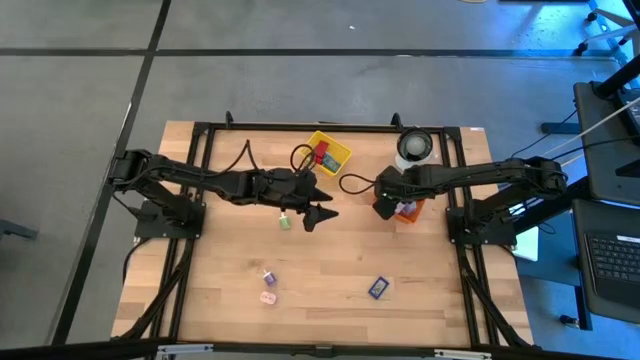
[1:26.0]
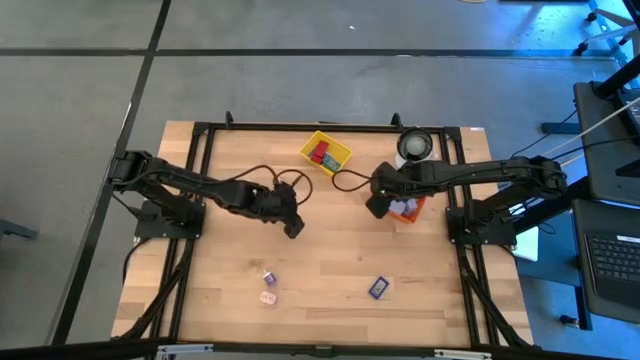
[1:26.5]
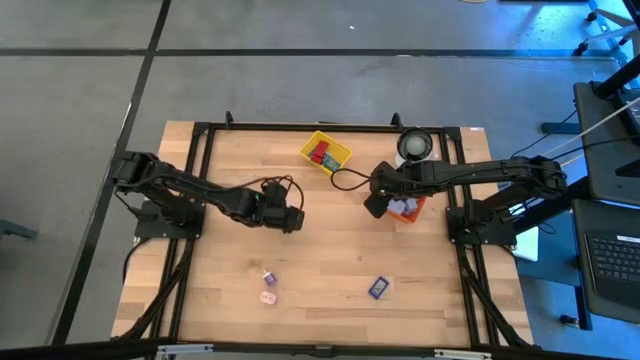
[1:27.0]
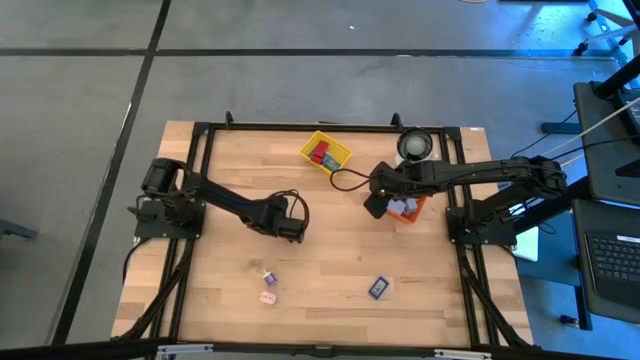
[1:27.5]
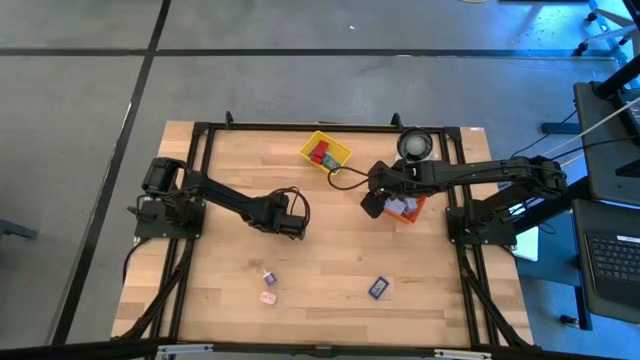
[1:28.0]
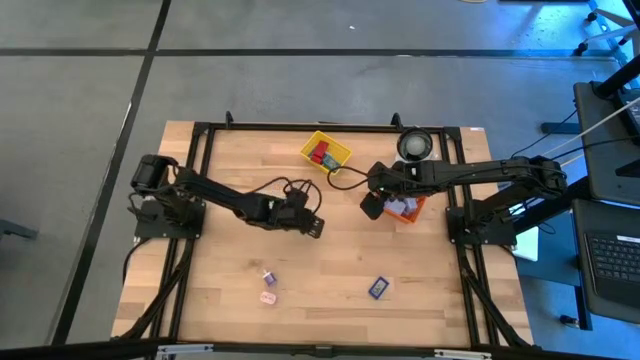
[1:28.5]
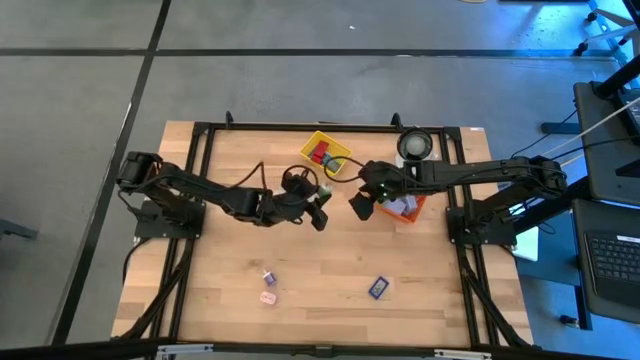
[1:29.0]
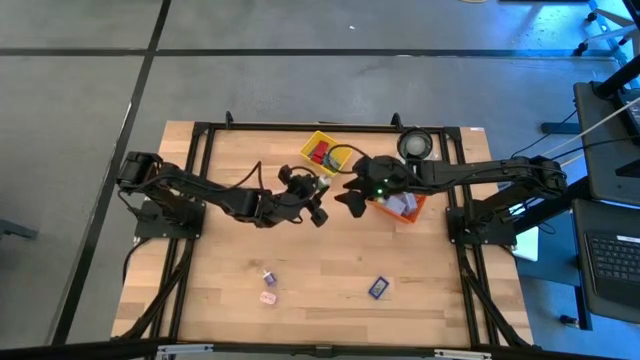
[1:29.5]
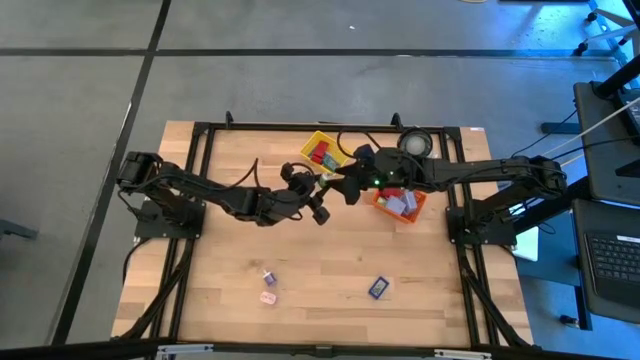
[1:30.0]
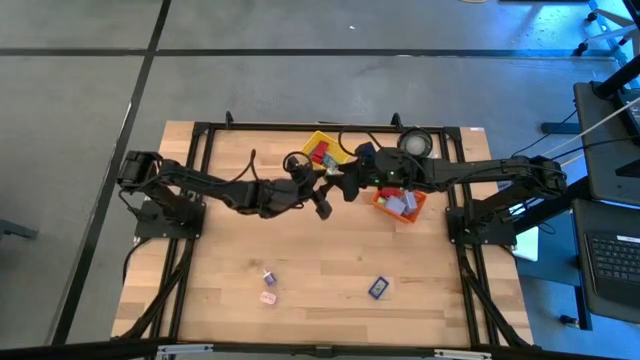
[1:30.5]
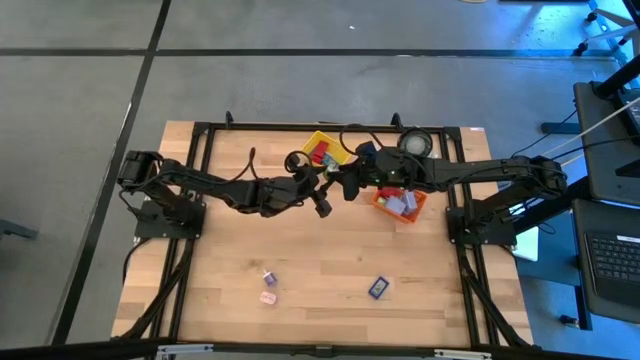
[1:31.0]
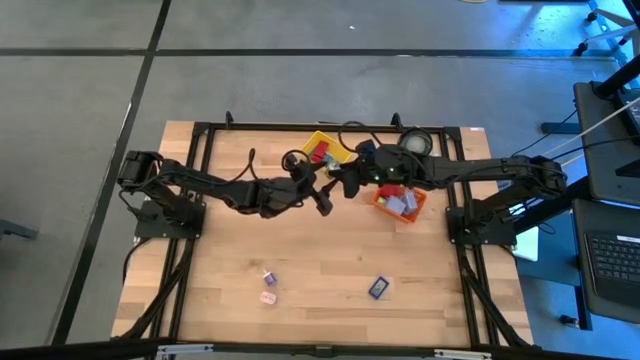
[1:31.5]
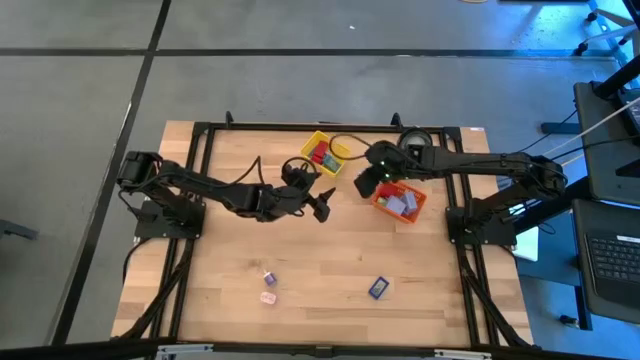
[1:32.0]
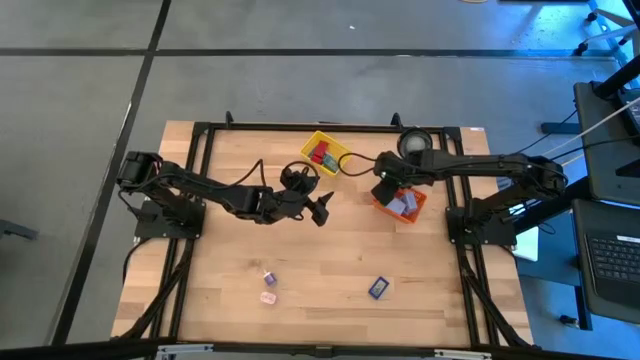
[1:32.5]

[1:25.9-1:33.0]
Task: Pick & Place Office items
Put the green charger adapter into the orange bin

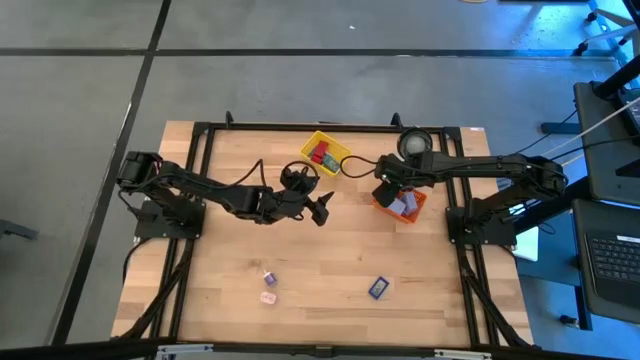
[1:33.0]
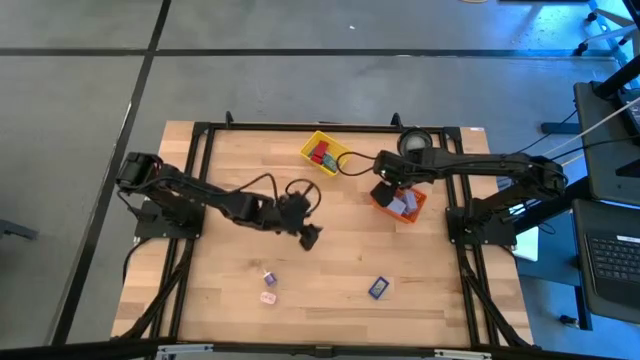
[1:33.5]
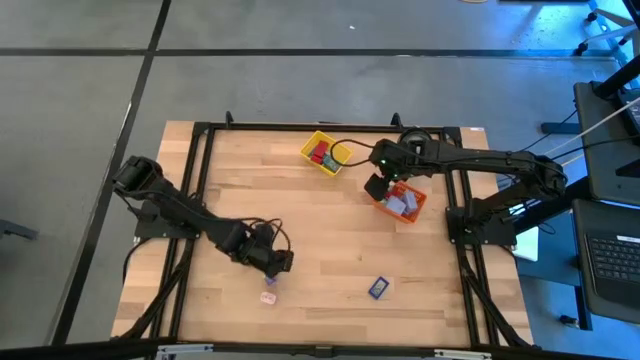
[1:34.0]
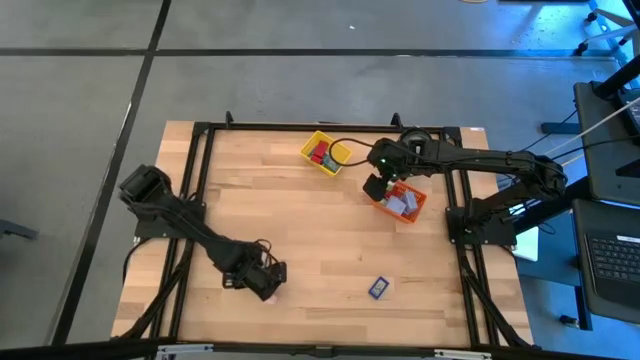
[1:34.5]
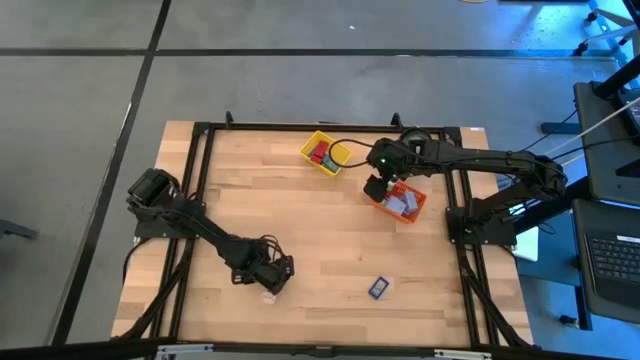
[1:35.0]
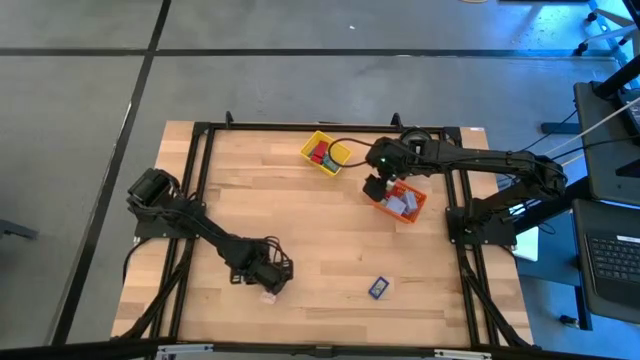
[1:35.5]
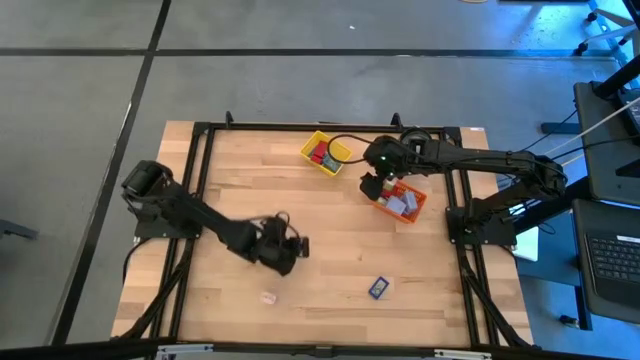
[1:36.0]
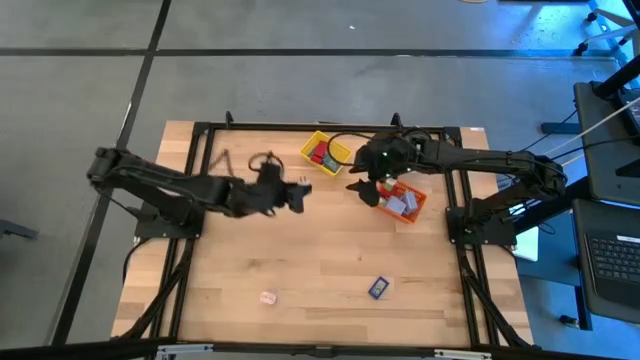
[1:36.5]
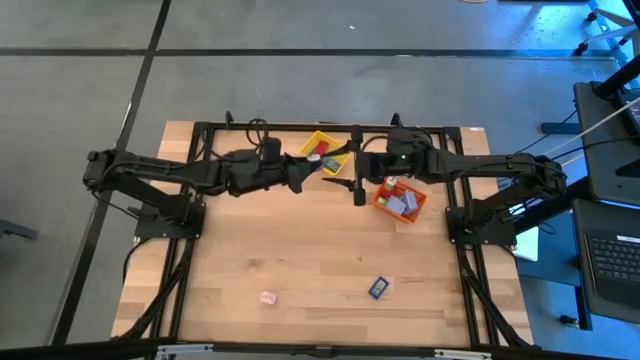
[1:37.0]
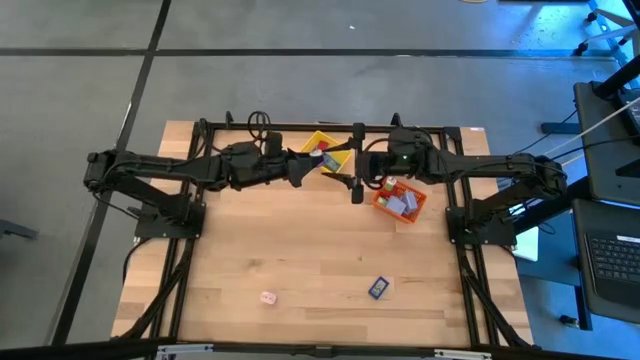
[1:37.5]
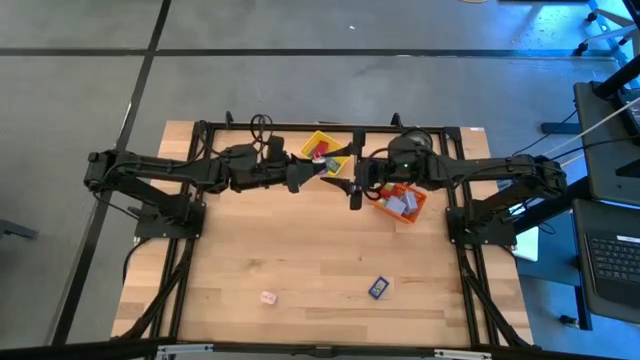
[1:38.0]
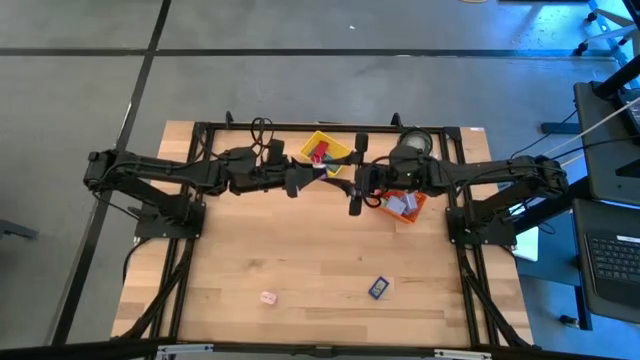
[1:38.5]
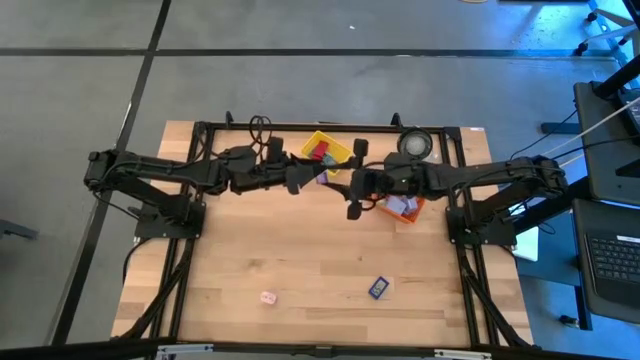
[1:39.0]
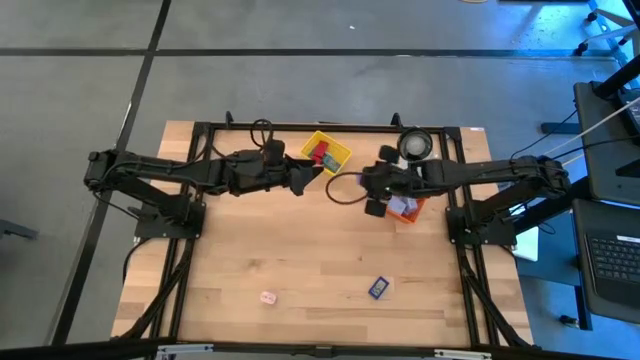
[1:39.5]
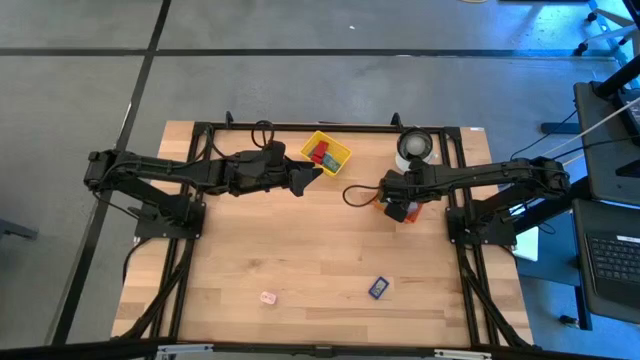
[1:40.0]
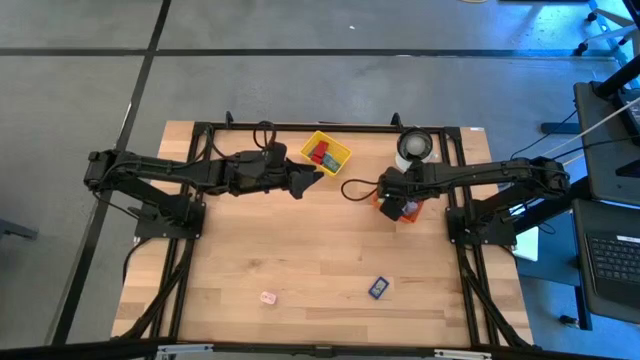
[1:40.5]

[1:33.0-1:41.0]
Put the blue charger adapter into the orange bin

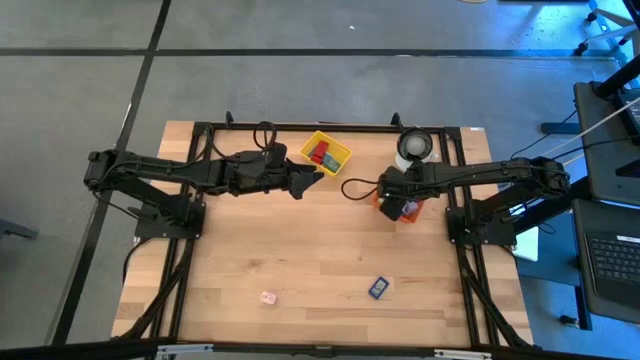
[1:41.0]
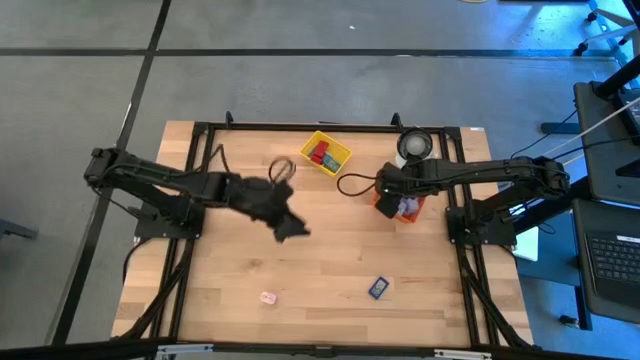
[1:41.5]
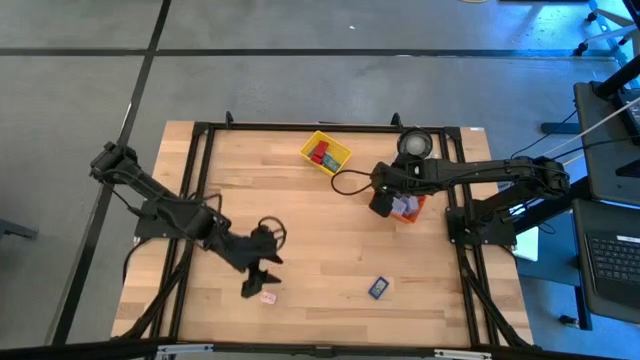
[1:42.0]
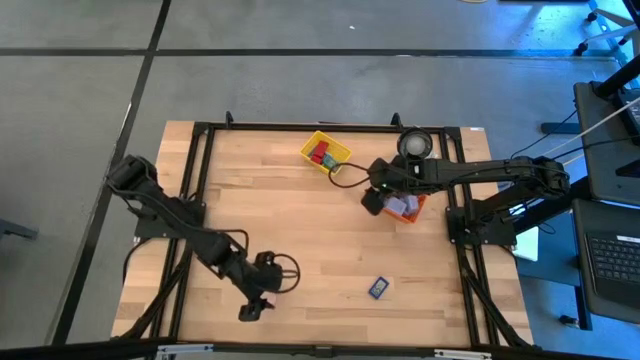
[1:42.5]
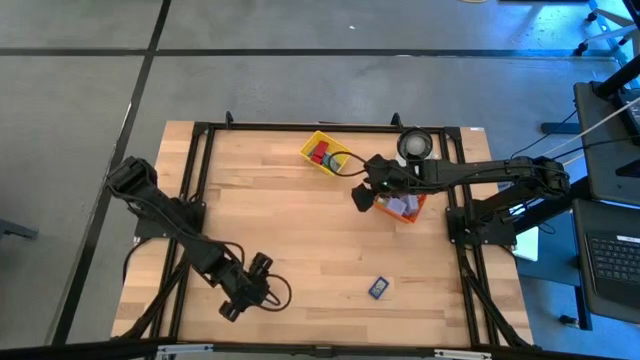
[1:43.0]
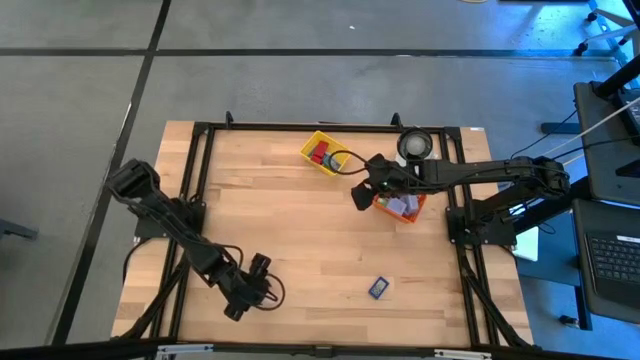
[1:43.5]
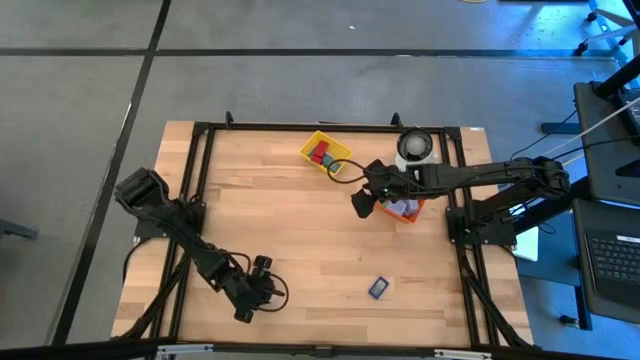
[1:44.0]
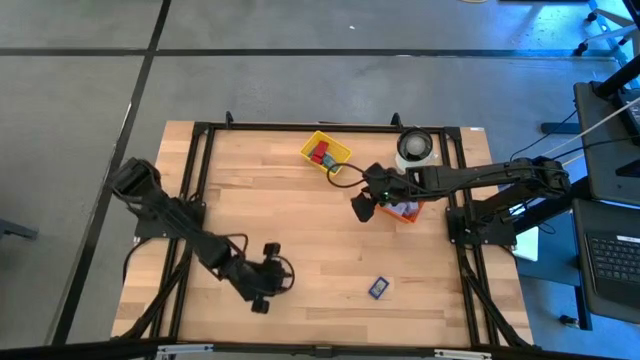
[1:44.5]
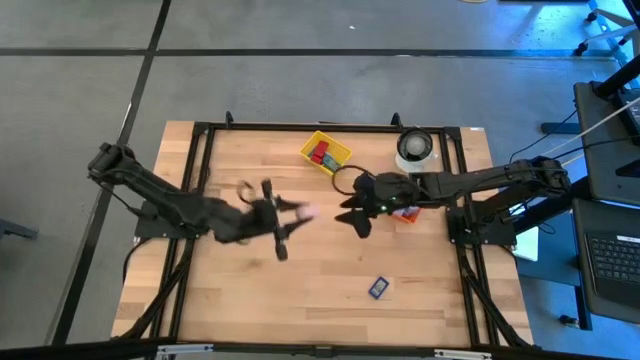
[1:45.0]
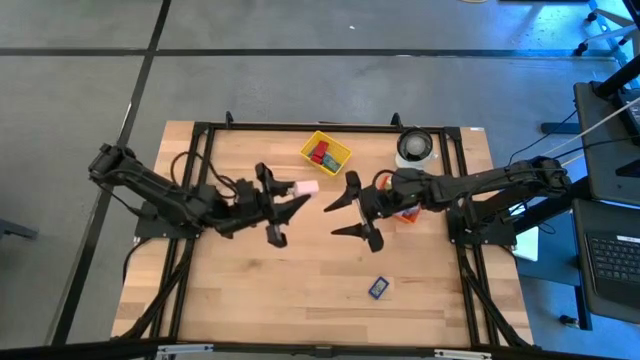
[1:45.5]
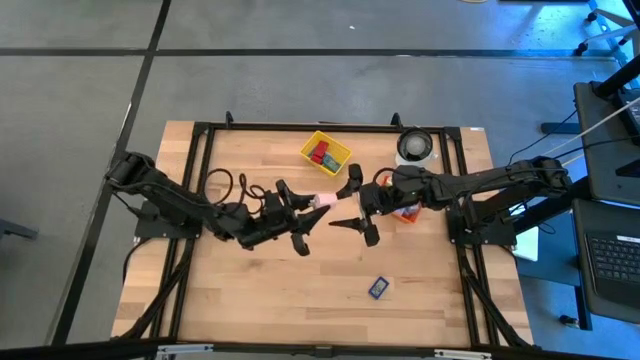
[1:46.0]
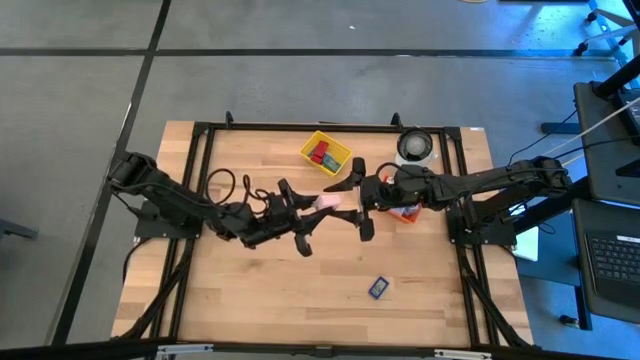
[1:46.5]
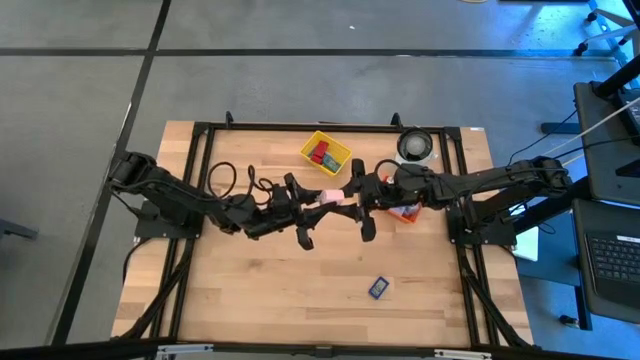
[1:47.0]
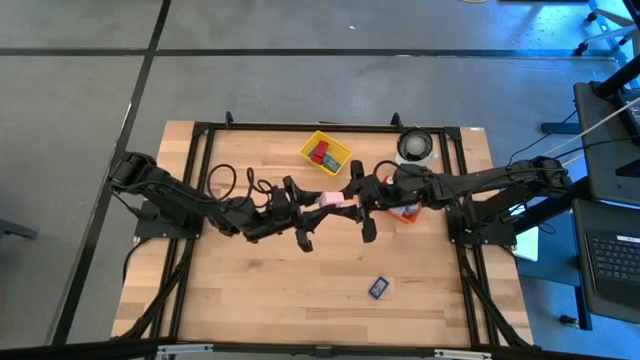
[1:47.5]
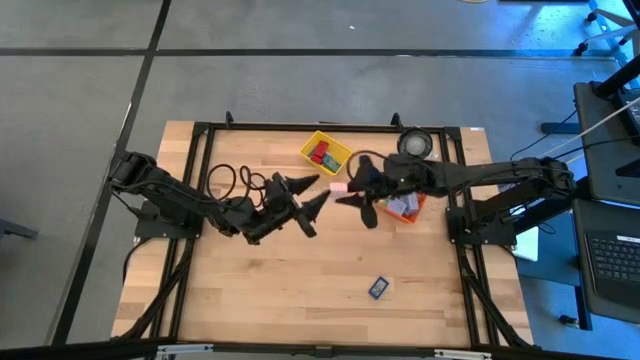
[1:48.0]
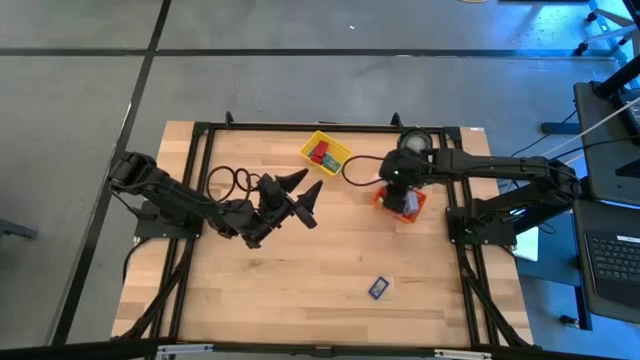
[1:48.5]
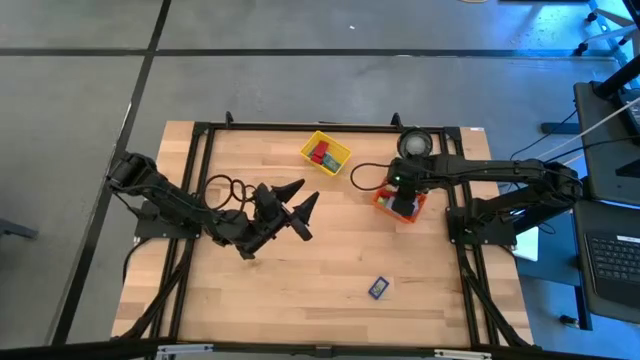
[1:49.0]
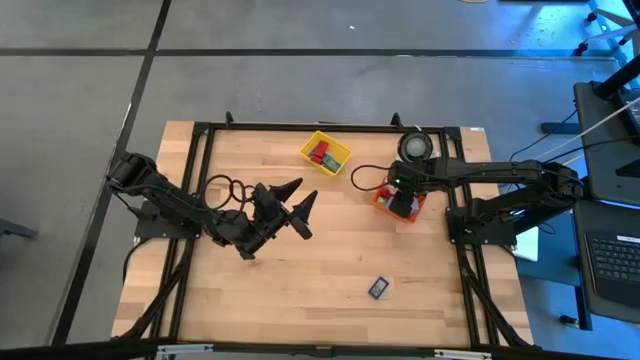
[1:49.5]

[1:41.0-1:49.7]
Put the pink charger adapter into the orange bin
